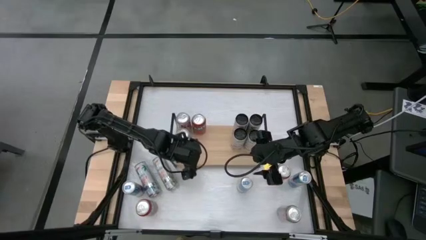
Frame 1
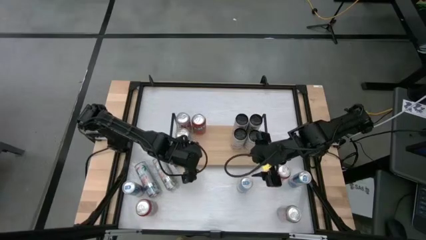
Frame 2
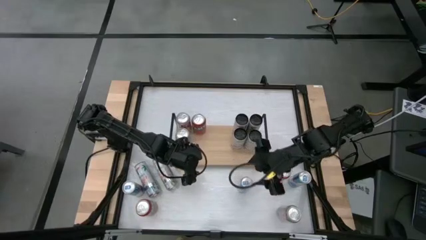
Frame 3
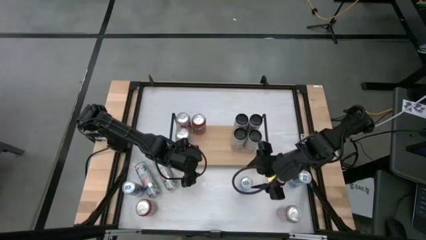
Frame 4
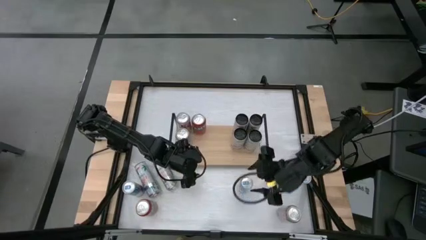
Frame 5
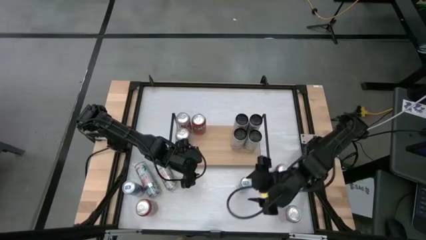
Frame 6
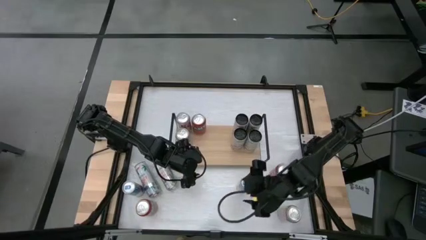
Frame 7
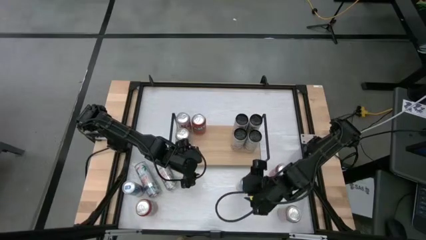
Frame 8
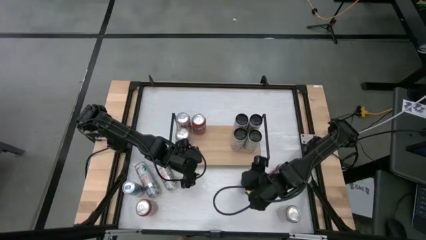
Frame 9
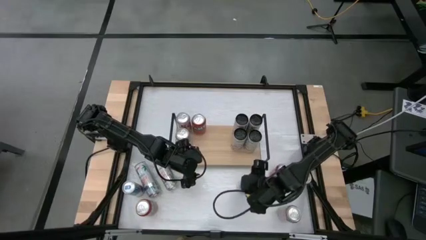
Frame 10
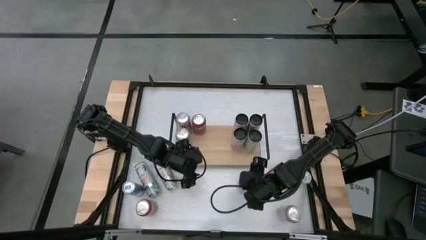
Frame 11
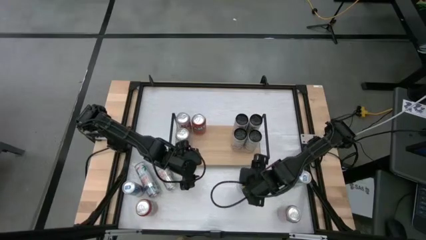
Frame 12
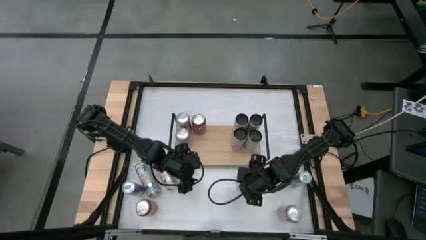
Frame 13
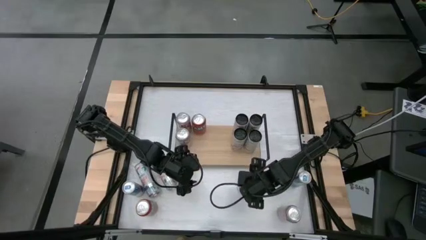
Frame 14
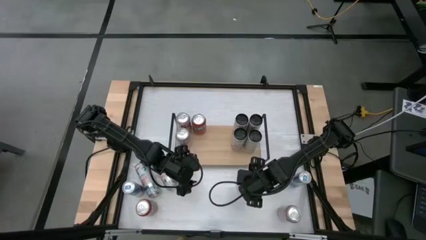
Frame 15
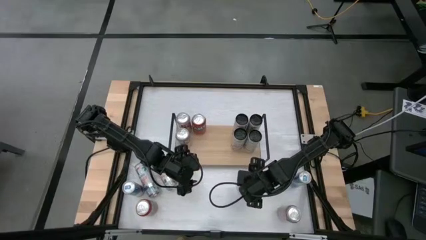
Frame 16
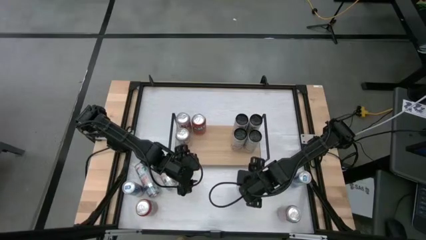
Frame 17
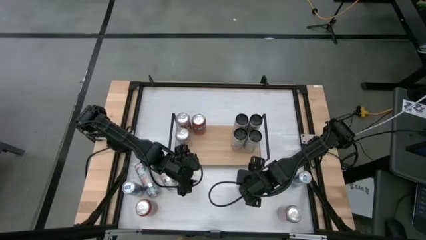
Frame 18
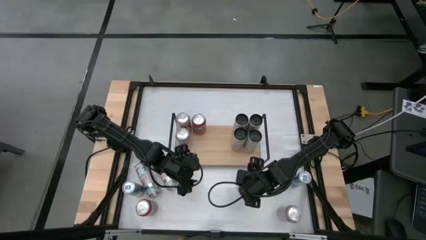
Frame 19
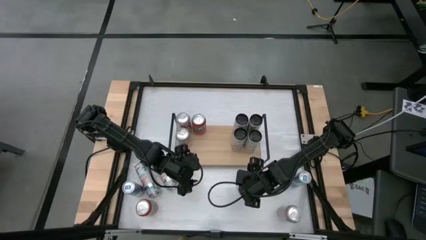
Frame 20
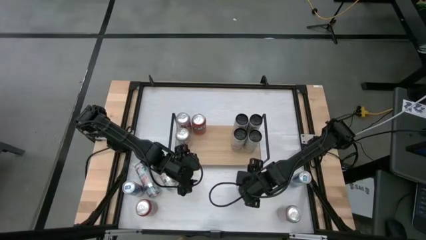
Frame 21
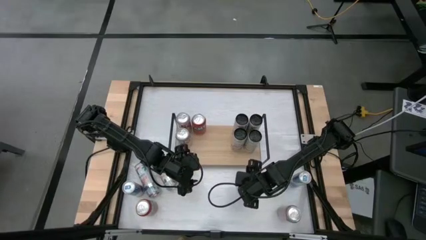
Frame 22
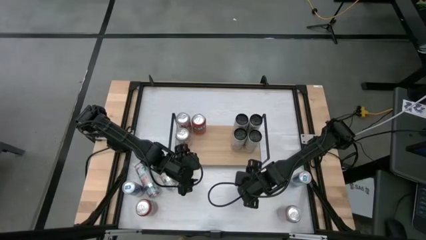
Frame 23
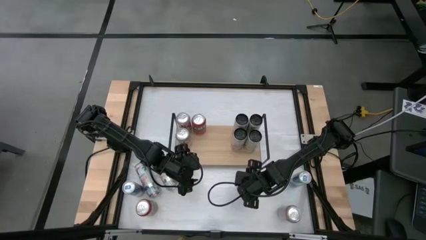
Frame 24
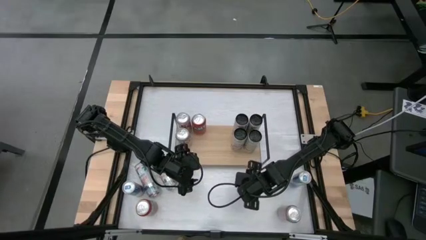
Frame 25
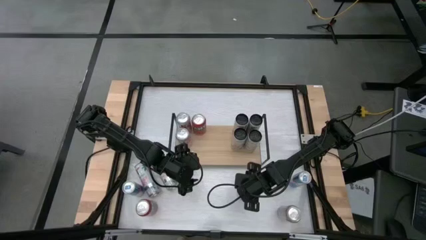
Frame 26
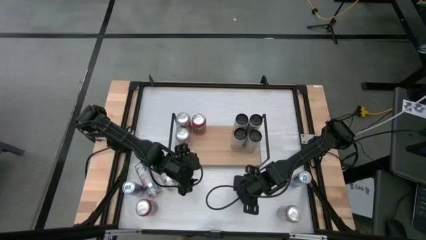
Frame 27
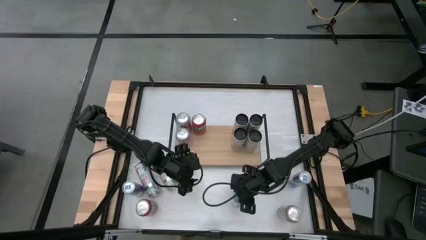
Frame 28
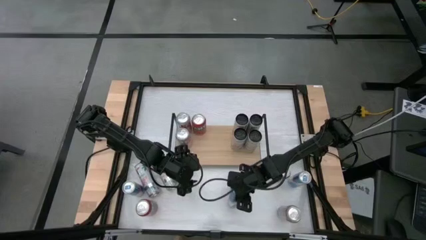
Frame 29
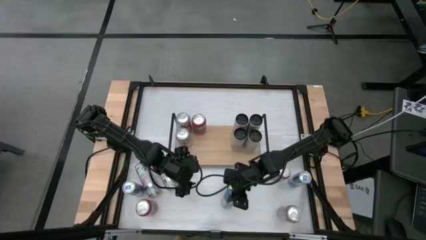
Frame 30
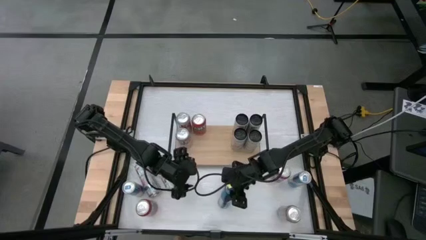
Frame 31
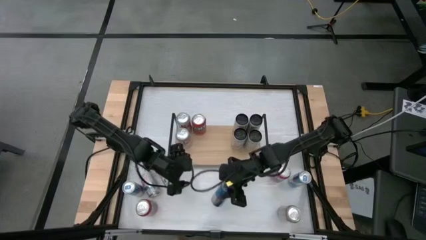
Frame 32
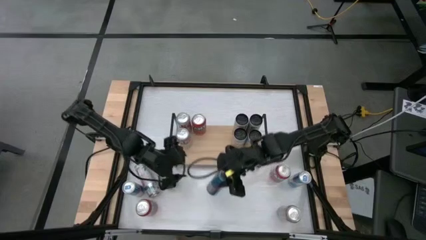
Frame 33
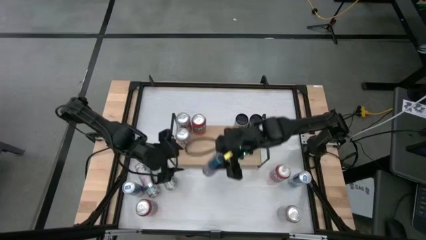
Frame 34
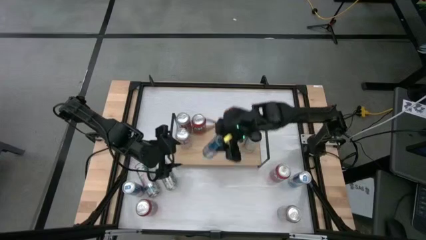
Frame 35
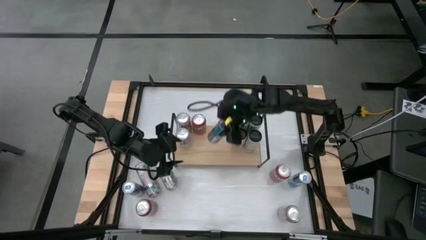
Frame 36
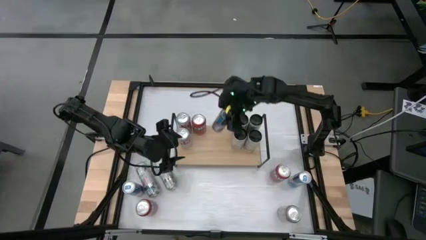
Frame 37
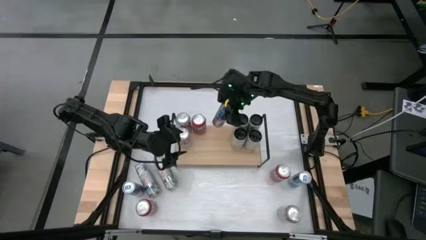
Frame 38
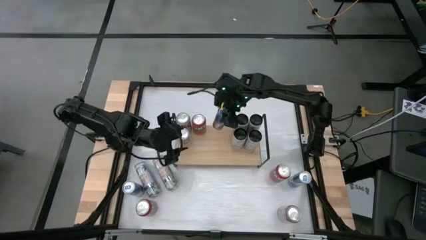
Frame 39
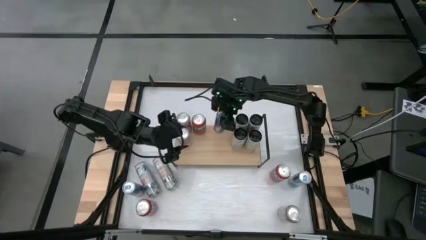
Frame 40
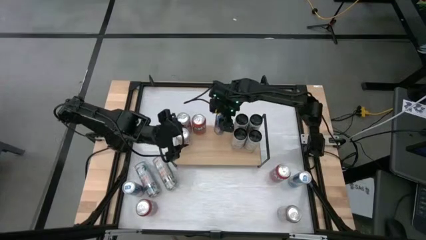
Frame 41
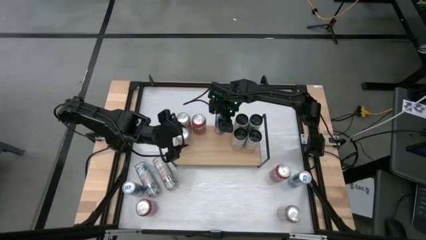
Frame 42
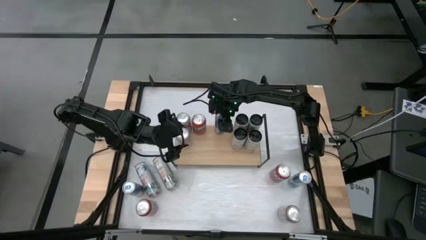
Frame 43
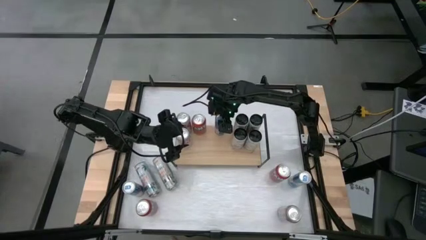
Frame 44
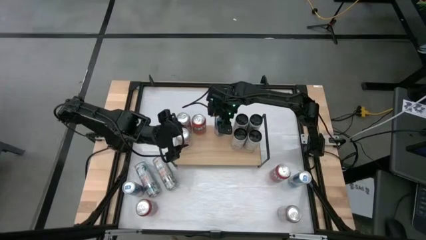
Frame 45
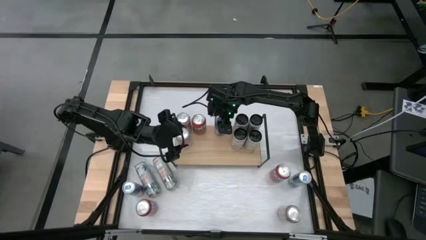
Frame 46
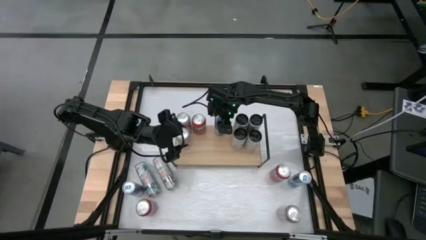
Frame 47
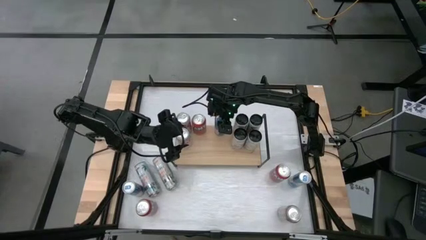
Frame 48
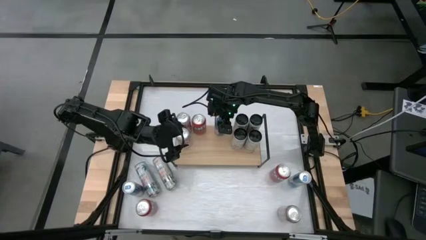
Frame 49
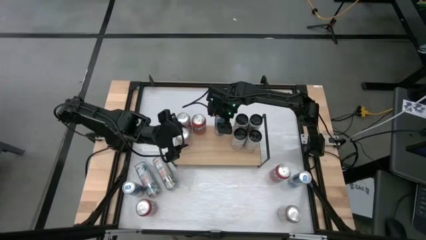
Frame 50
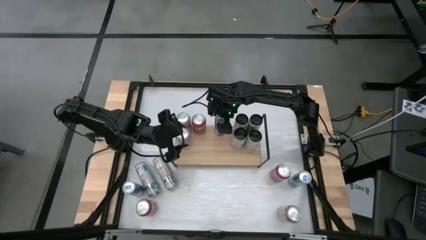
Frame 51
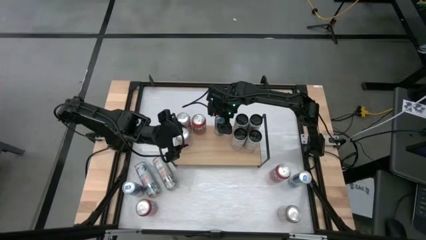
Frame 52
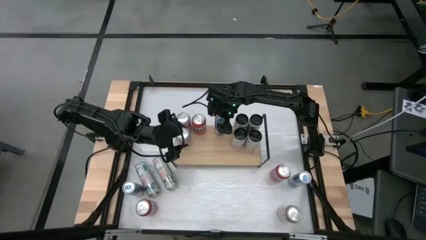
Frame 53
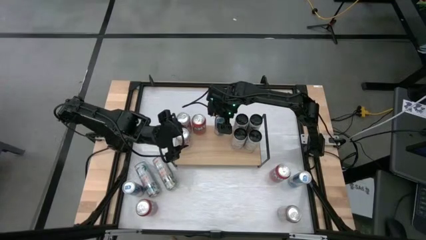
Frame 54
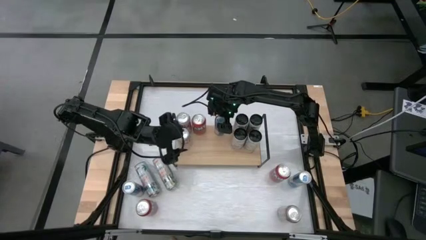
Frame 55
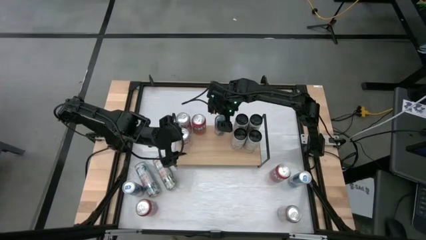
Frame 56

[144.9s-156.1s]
Task: Place canned beverage on shelf
Put the middle blue soda can on the shelf
